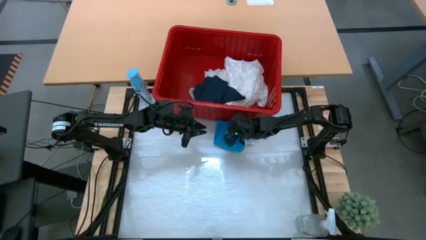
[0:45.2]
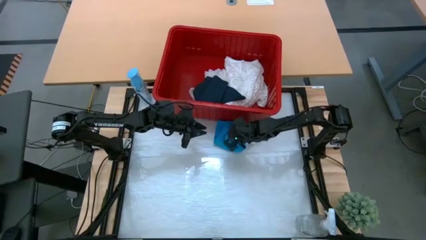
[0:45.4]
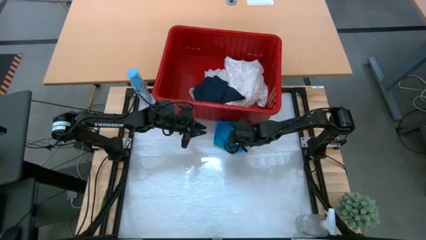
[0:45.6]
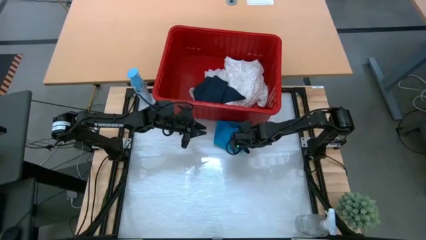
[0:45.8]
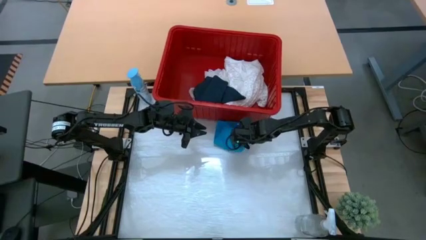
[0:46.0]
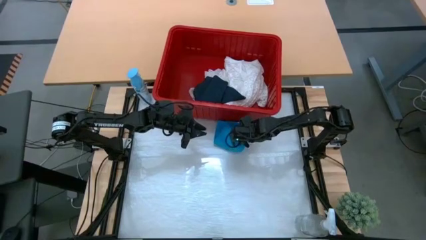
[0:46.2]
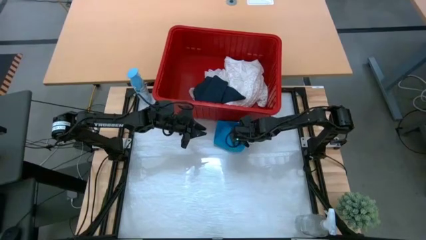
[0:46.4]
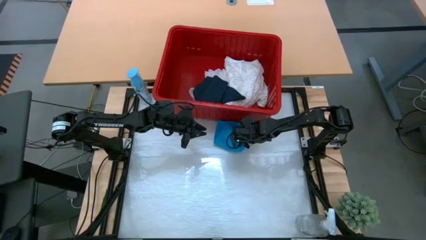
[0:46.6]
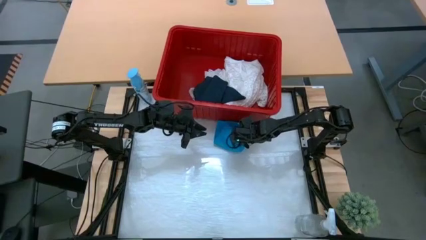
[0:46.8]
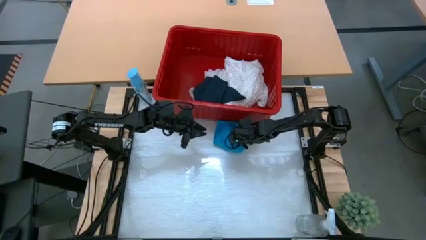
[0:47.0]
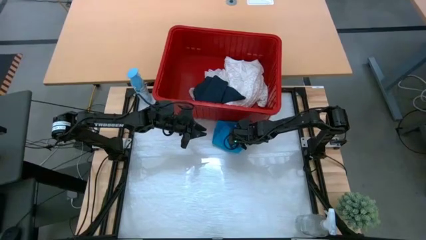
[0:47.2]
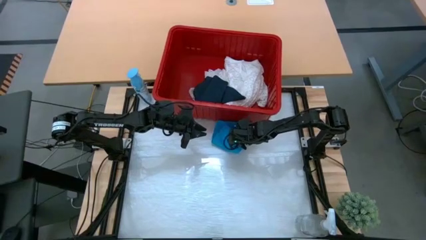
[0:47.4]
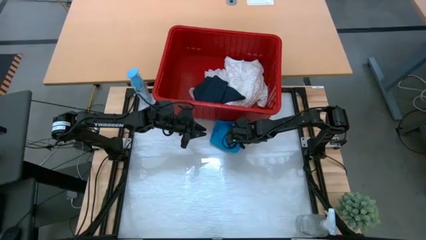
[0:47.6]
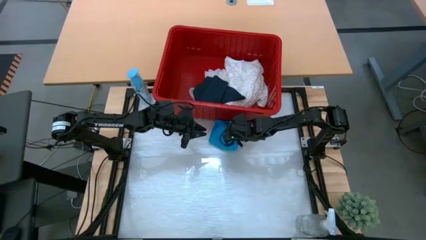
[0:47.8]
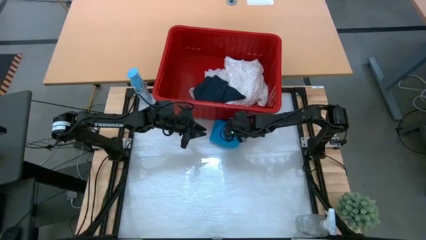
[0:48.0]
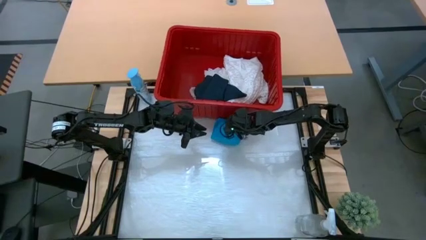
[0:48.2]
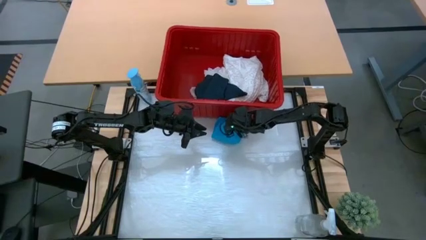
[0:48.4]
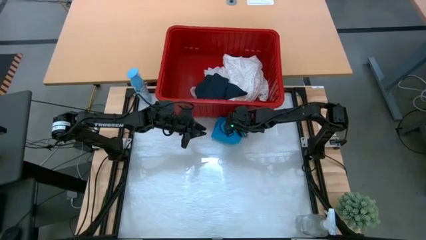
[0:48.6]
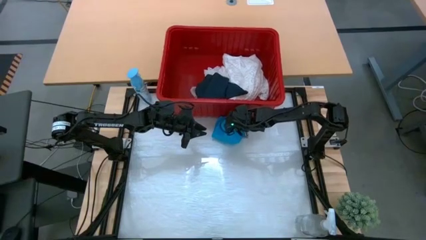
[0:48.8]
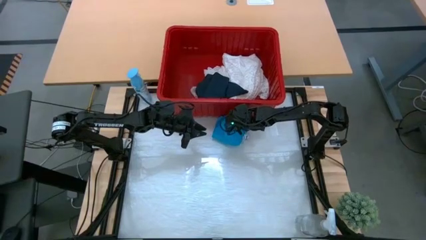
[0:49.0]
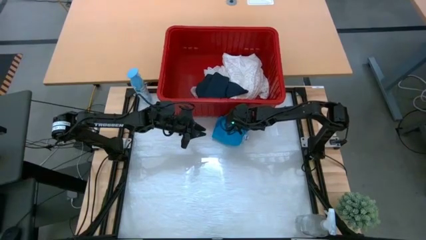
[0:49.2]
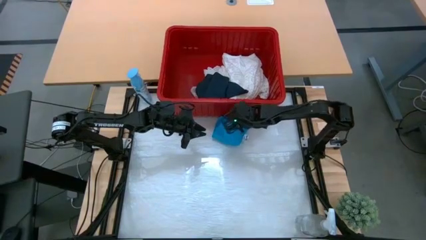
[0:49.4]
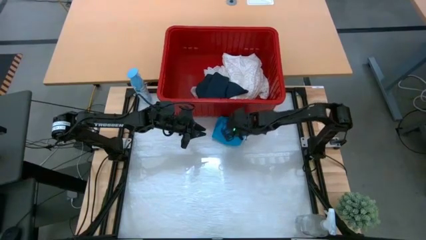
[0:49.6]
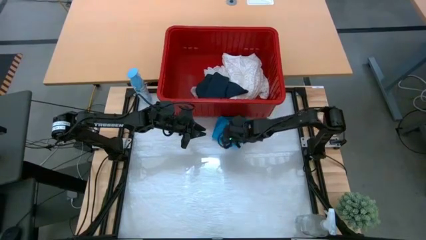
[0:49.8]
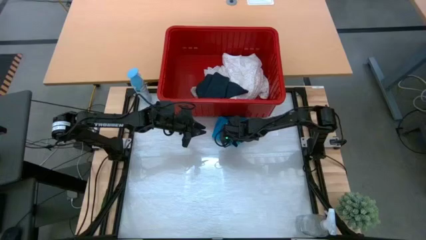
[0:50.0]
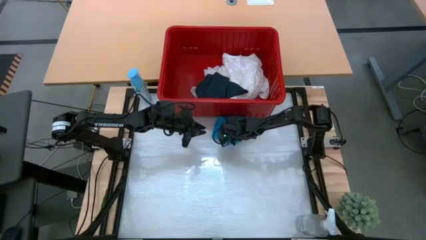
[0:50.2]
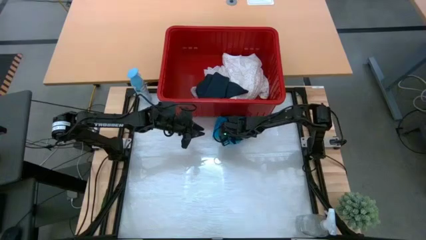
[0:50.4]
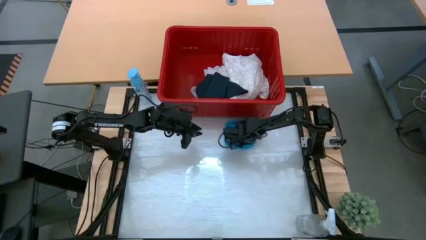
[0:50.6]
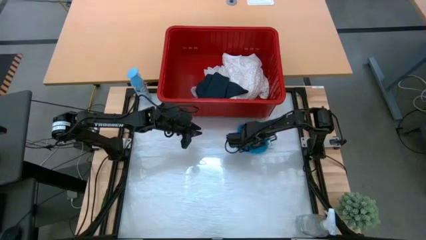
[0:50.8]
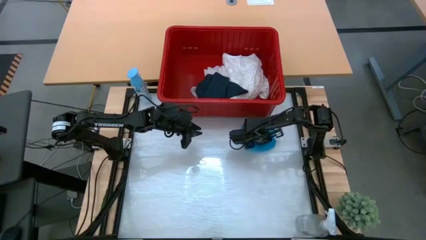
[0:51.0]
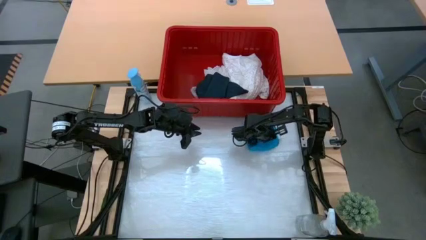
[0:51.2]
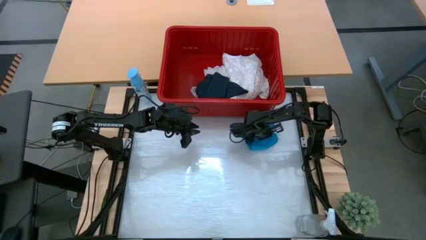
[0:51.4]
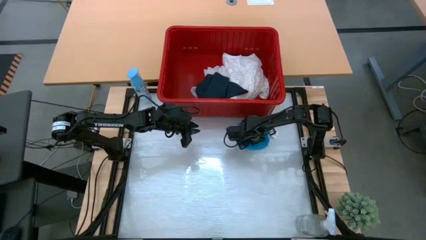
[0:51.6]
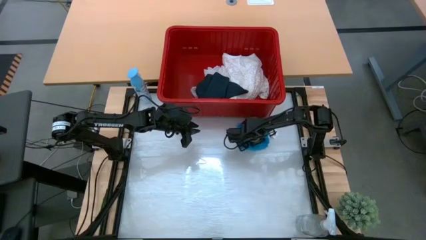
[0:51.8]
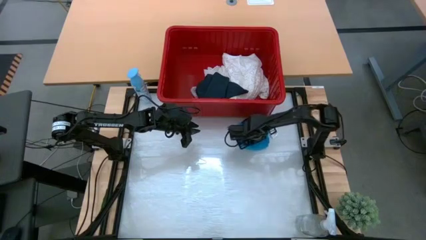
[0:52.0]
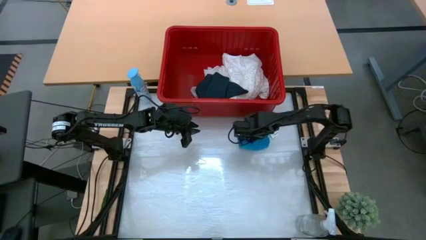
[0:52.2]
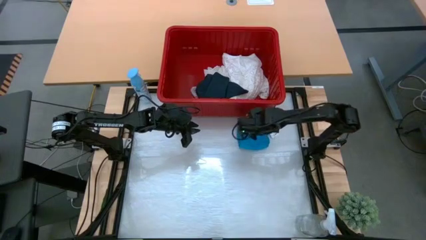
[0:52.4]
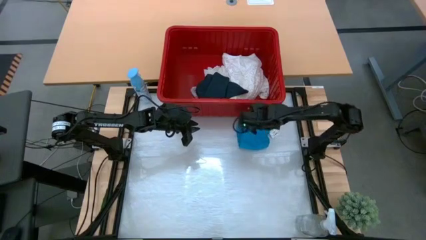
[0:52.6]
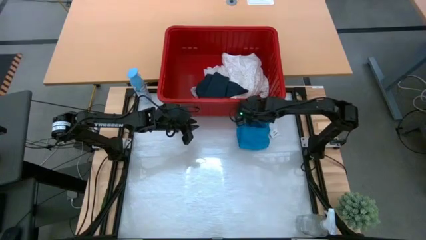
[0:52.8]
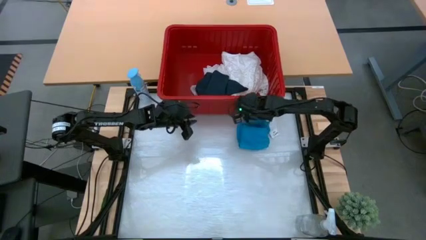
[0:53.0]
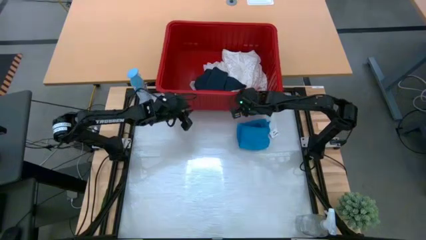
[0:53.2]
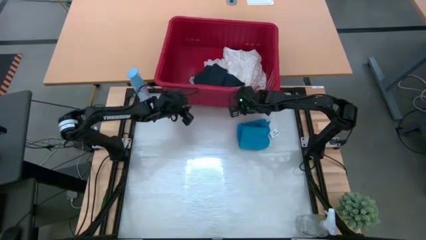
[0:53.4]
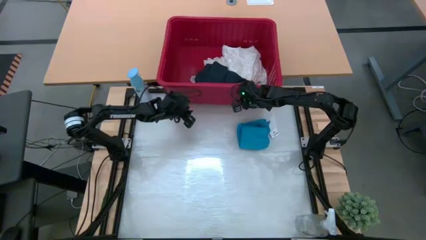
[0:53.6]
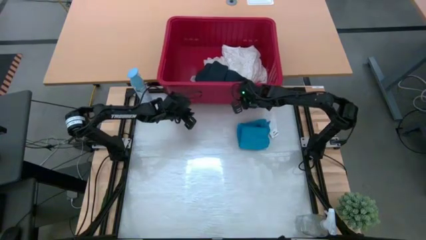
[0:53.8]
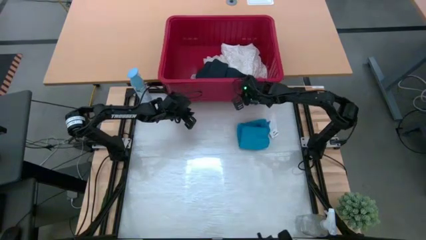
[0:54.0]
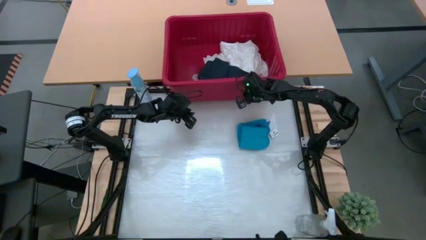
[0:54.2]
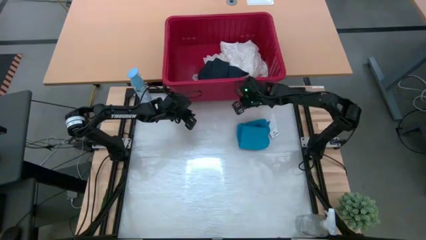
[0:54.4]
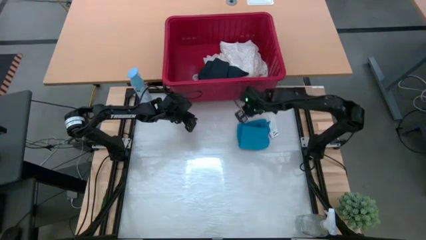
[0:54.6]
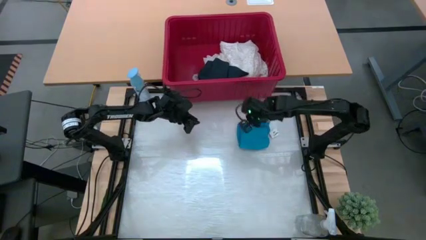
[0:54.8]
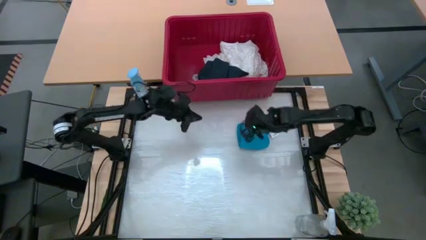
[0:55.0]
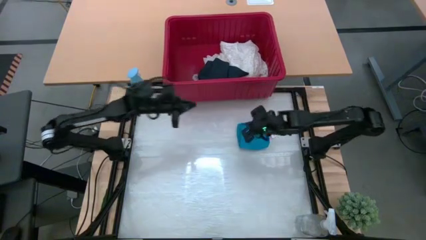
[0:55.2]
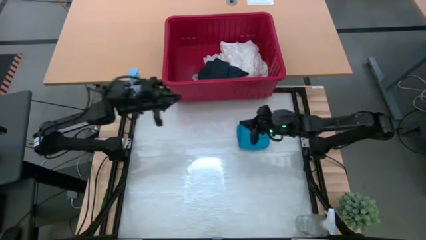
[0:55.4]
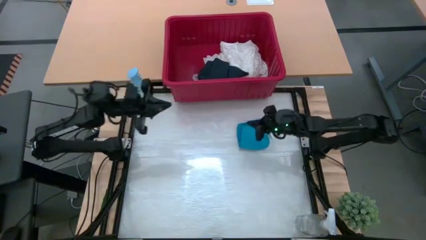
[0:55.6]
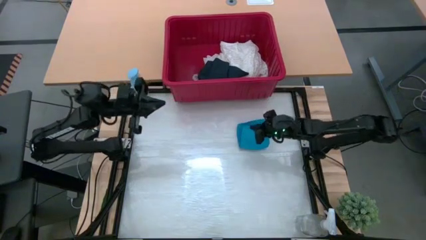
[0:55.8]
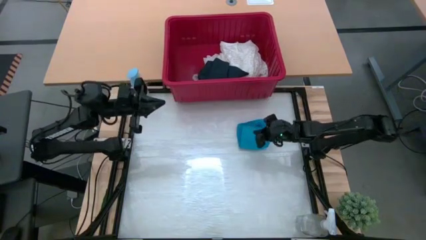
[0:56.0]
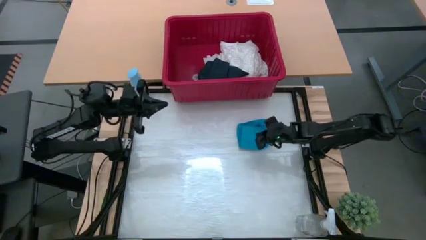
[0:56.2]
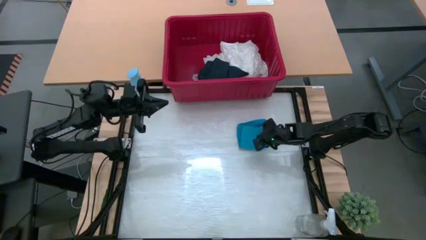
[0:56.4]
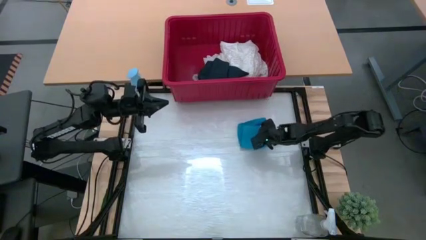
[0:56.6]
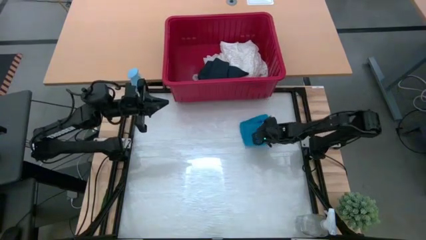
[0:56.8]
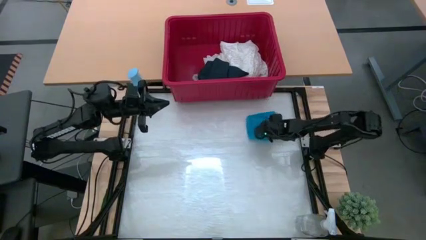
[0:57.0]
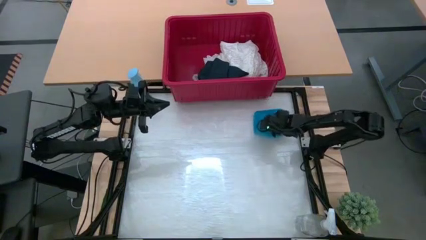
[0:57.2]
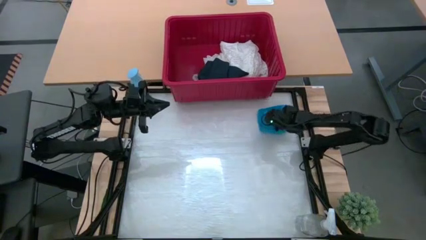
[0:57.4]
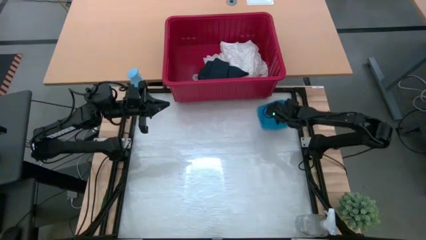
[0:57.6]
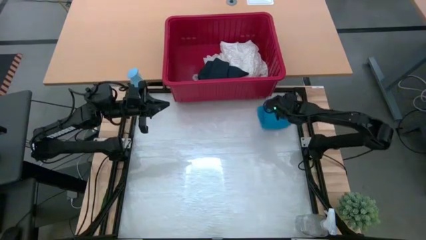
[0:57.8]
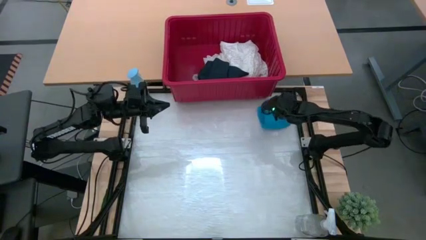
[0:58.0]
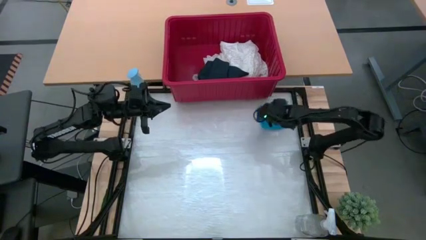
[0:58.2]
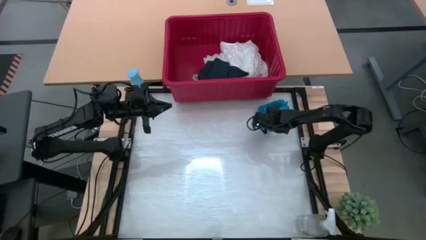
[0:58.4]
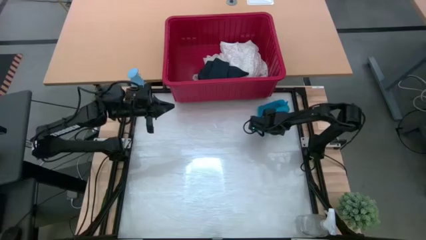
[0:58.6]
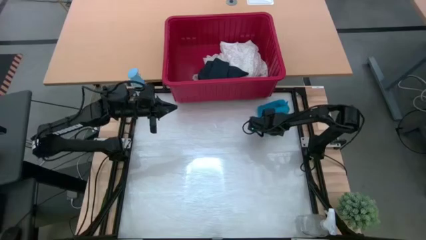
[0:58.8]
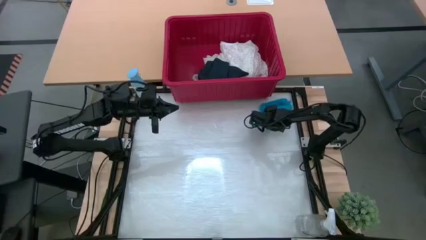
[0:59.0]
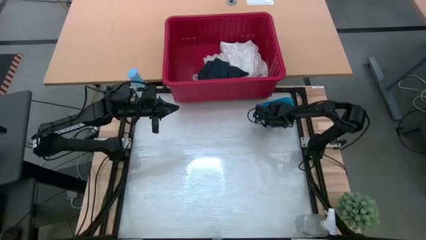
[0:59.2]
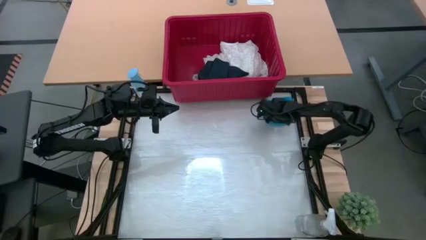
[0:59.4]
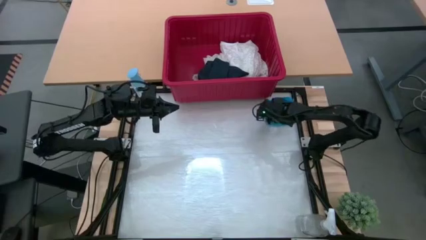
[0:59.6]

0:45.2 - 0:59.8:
Task: Fold laundry
Fold the blue shorts
